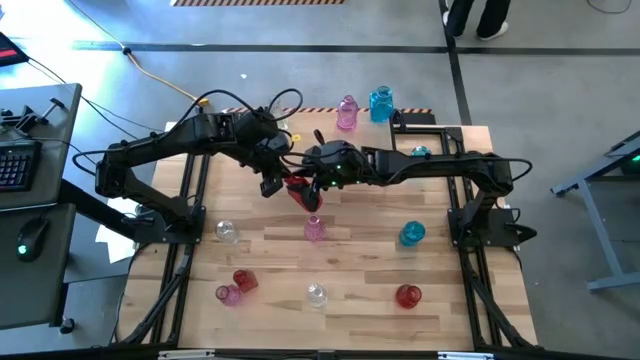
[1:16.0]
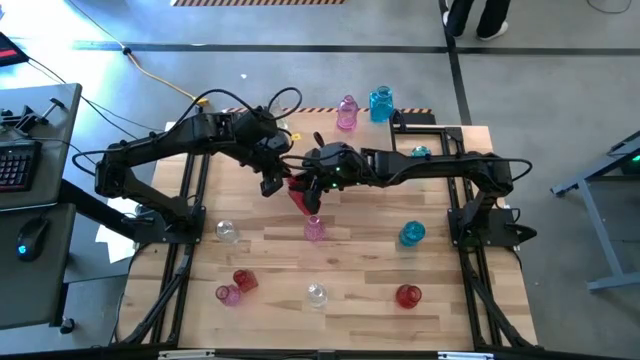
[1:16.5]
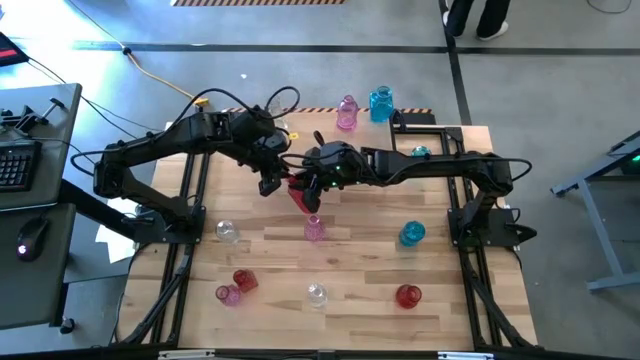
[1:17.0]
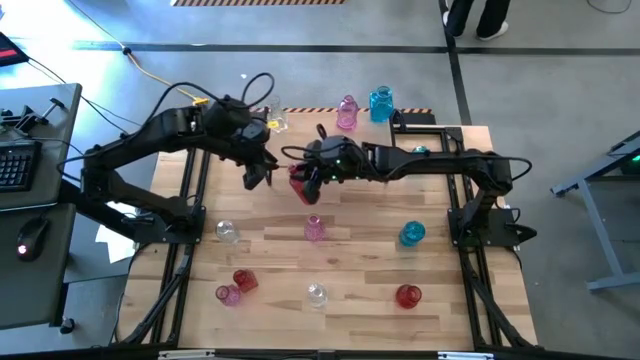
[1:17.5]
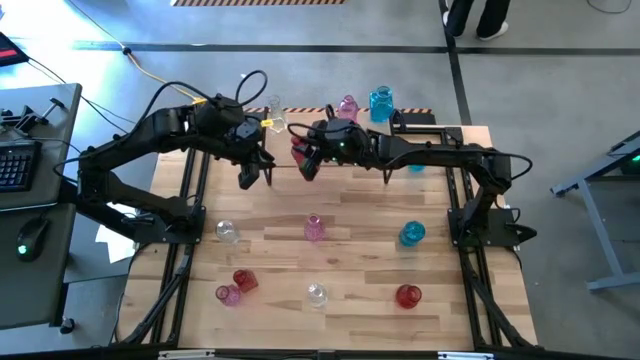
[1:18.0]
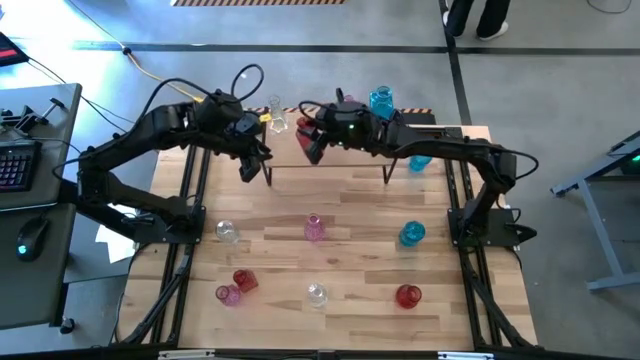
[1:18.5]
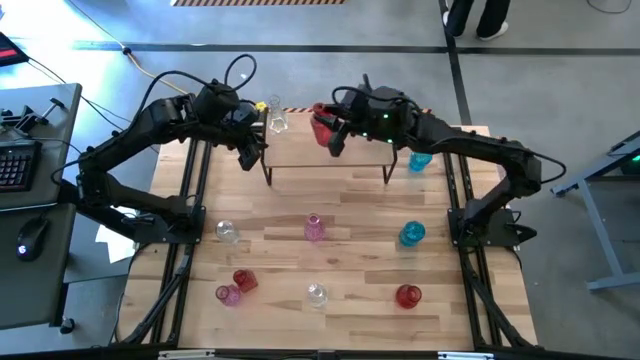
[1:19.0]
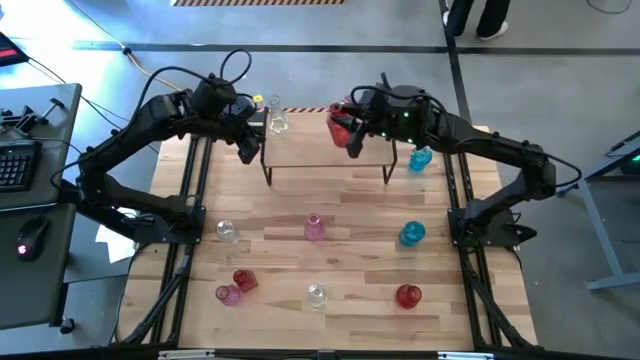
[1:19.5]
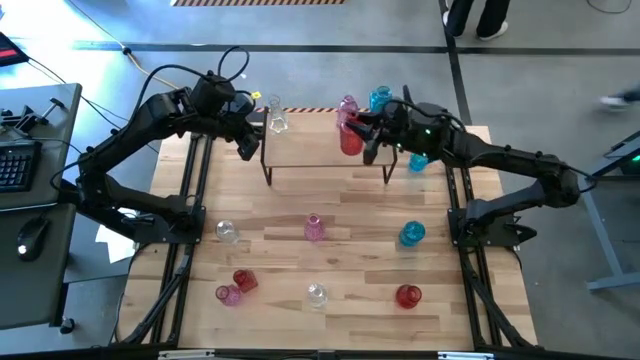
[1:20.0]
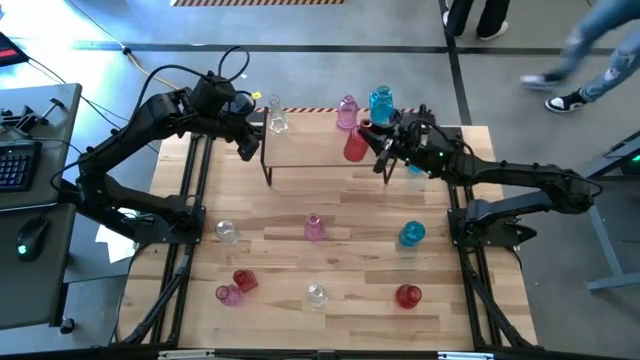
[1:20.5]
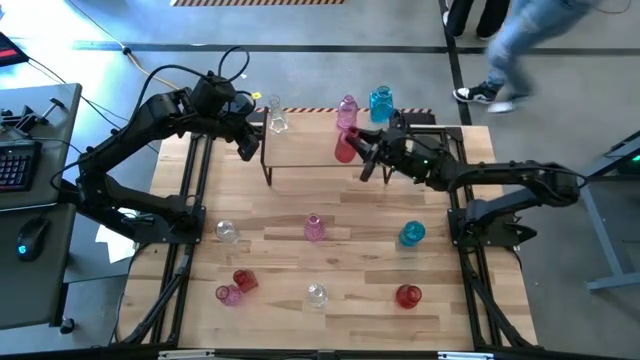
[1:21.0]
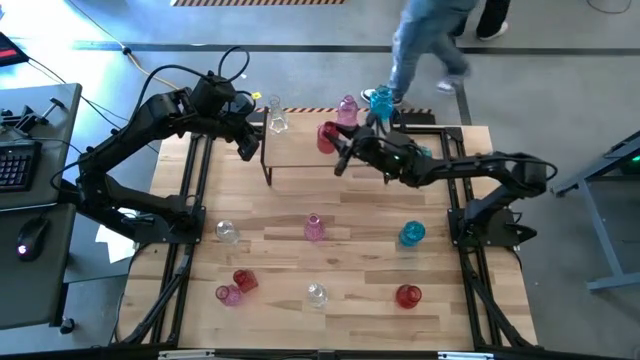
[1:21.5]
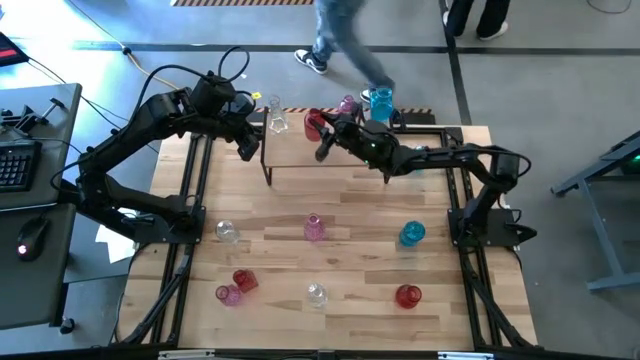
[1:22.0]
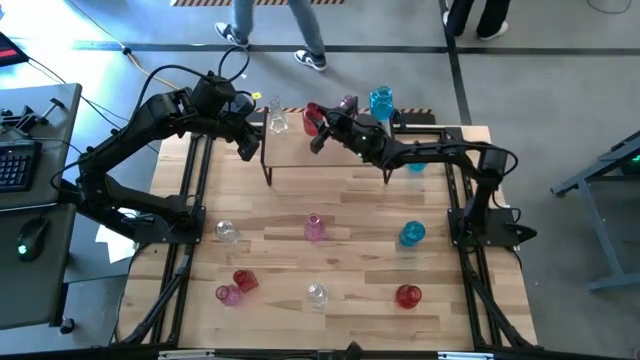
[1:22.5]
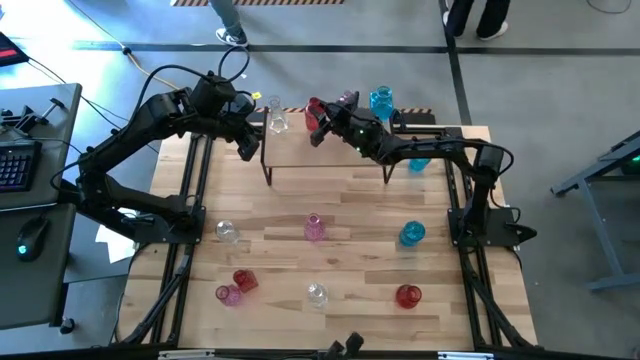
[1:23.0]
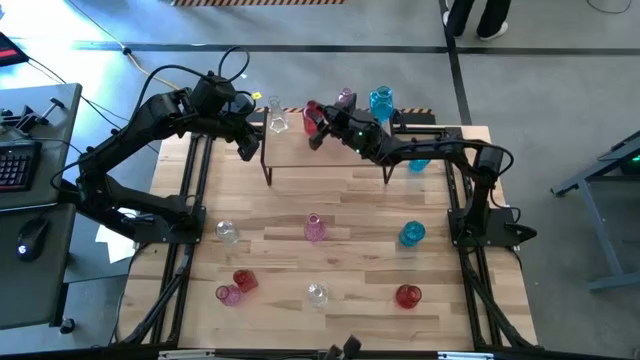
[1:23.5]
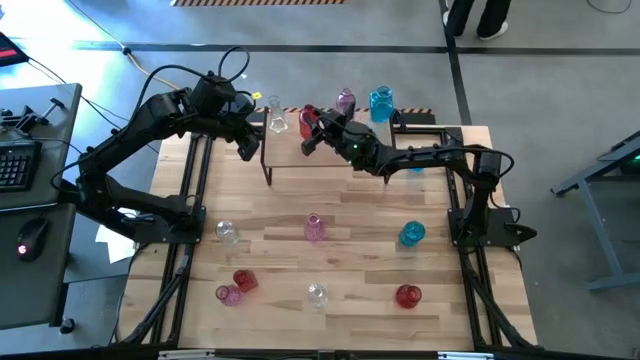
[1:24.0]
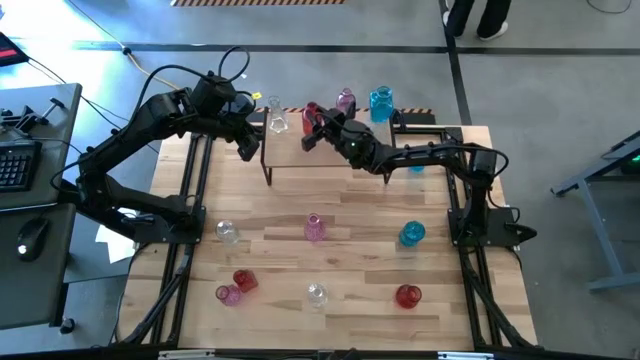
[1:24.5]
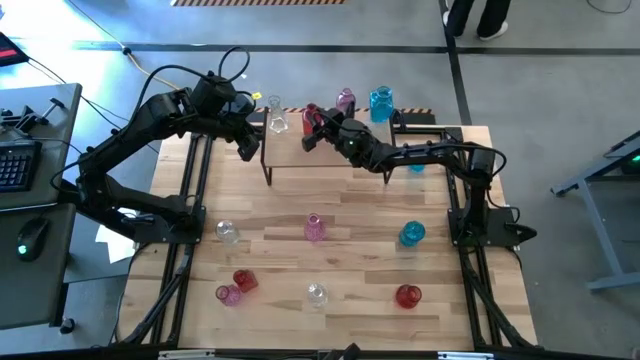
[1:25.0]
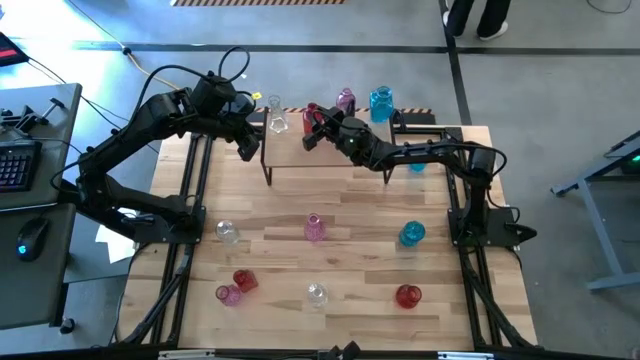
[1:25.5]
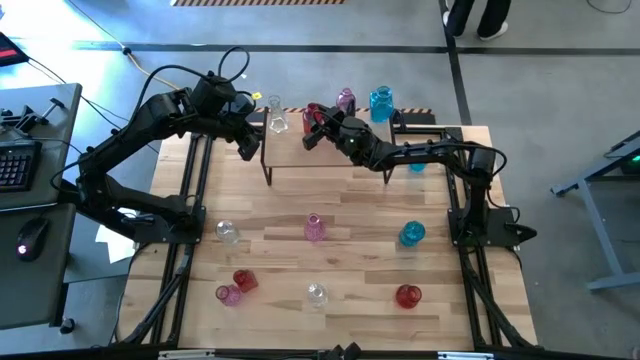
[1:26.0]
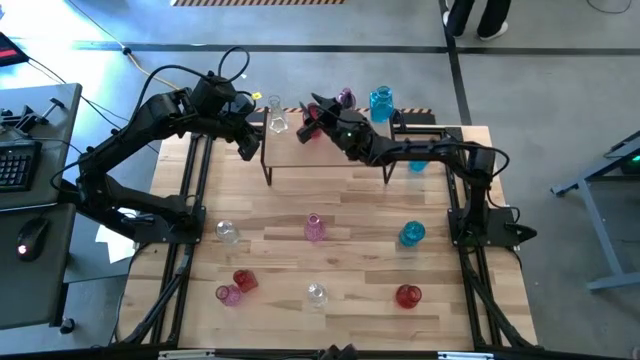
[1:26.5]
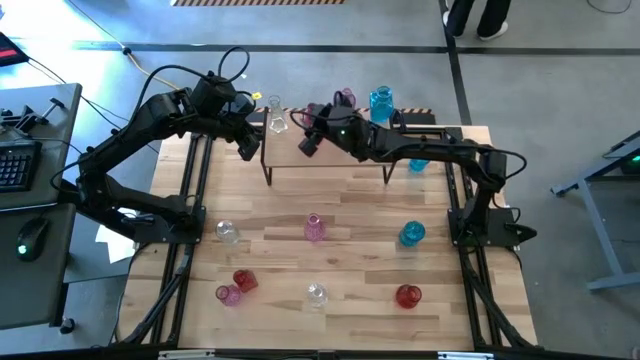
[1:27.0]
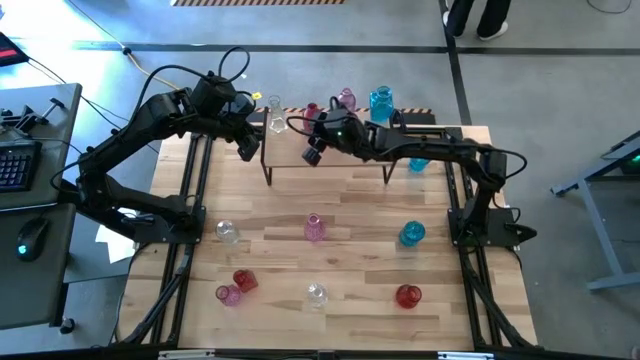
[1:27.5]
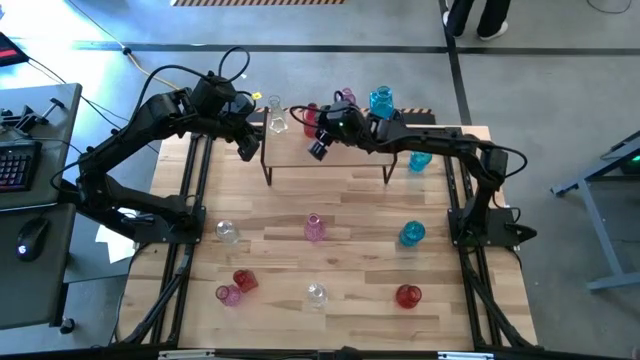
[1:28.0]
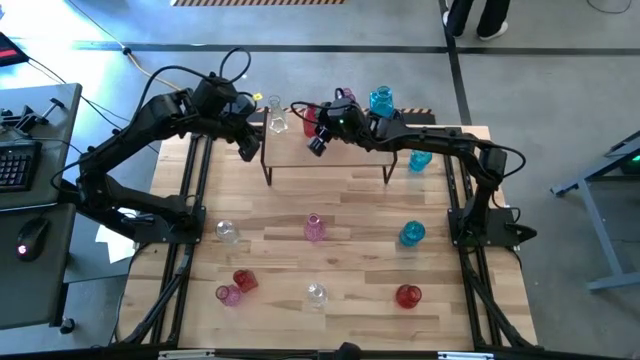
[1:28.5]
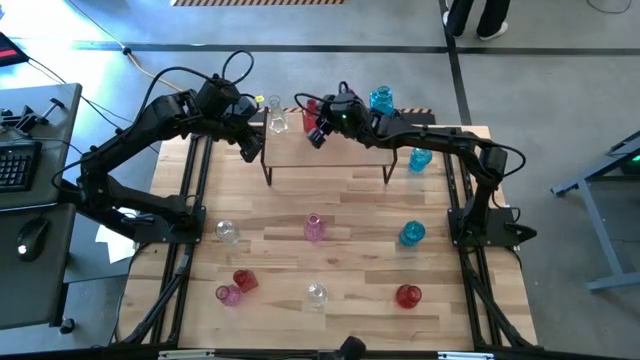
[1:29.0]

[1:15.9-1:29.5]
Task: sort vases onto shelf
Put the top red vase on the shelf

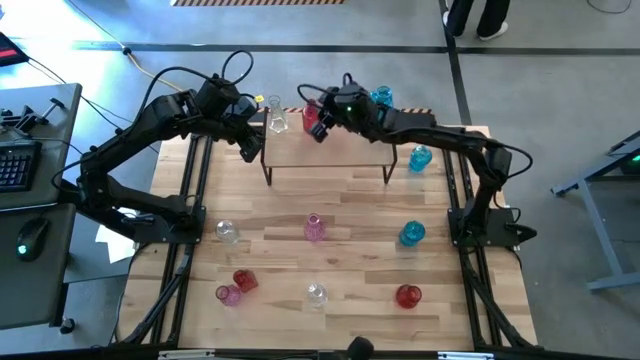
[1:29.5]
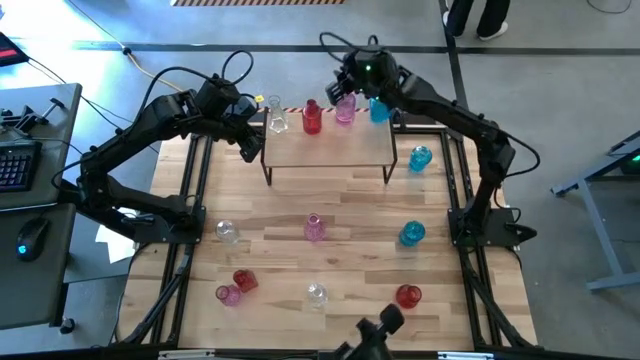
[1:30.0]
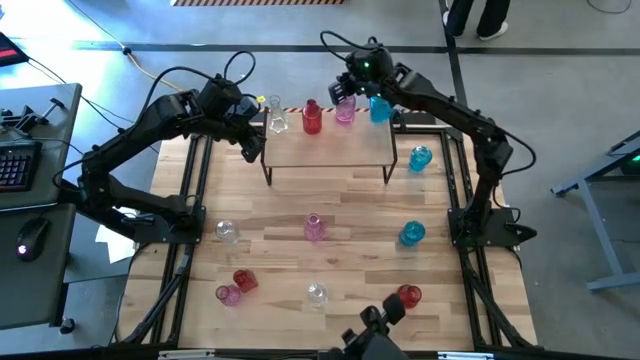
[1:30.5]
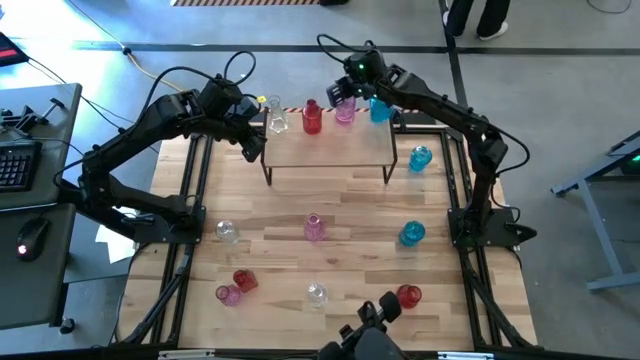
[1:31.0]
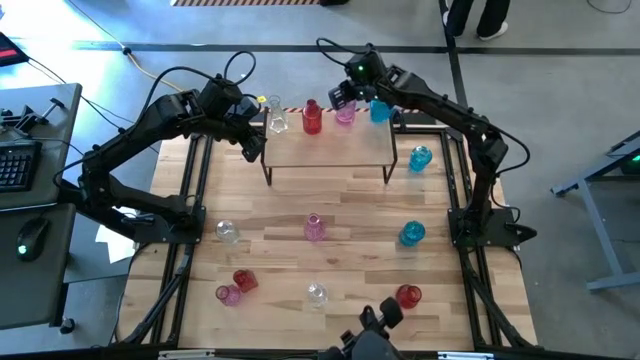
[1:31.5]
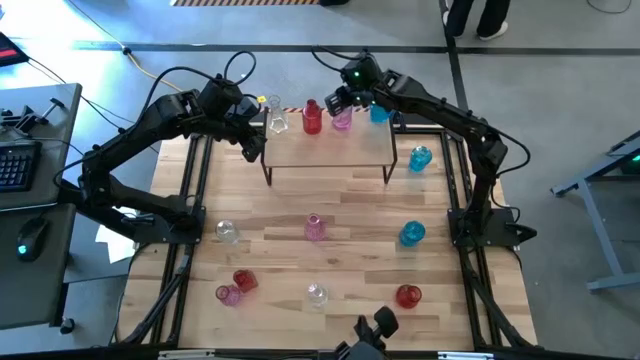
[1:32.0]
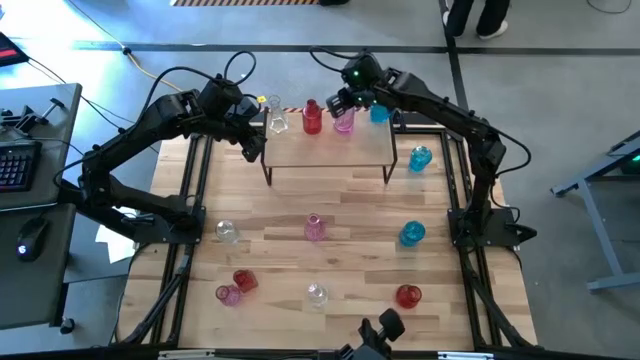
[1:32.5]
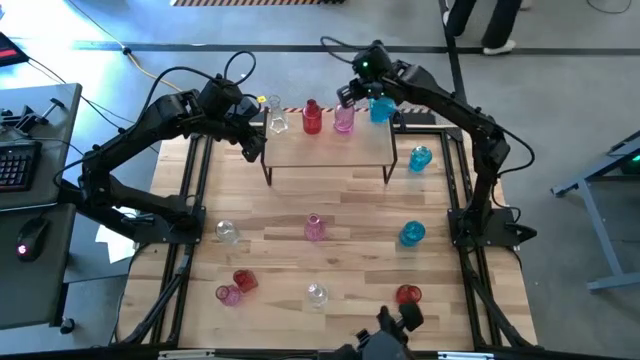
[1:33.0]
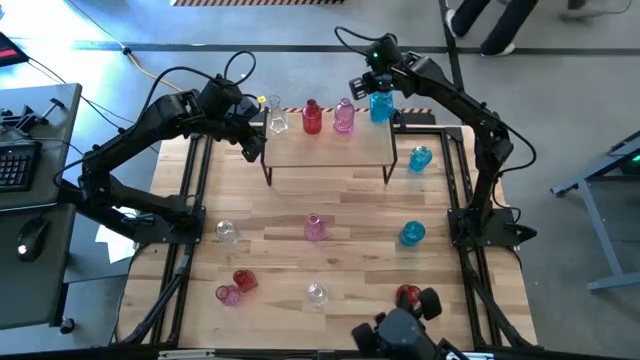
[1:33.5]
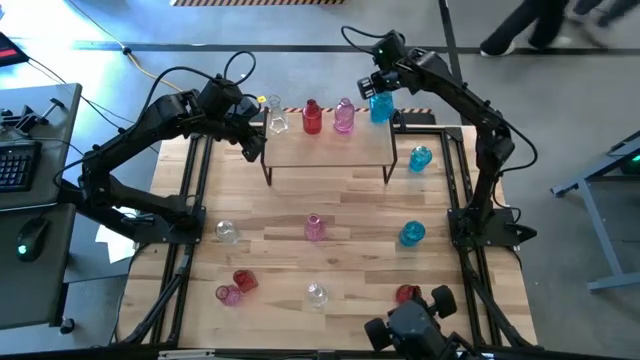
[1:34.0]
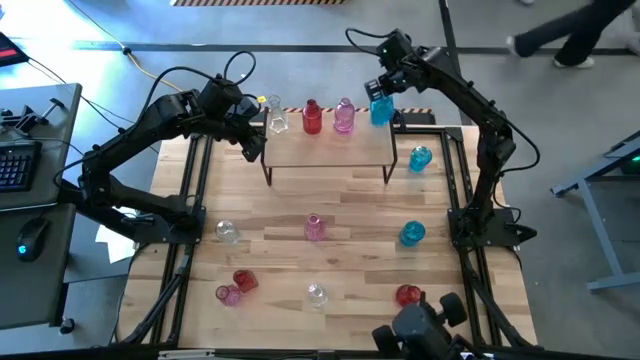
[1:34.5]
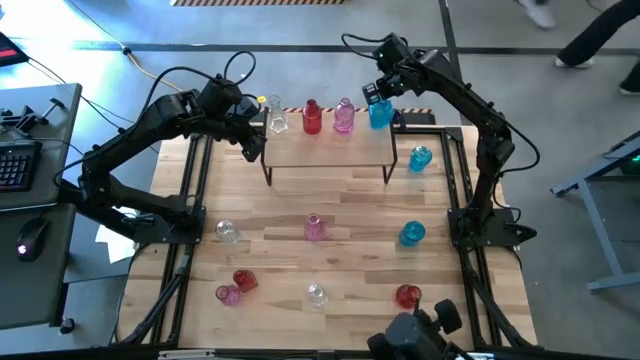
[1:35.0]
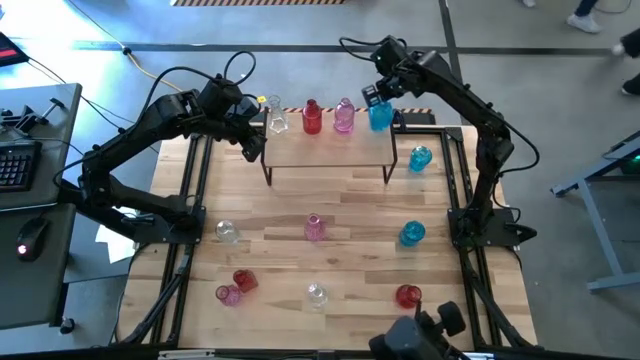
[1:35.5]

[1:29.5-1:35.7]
Adjust the vases on the shelf
